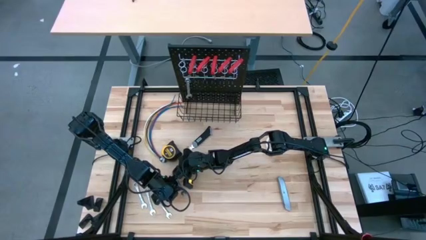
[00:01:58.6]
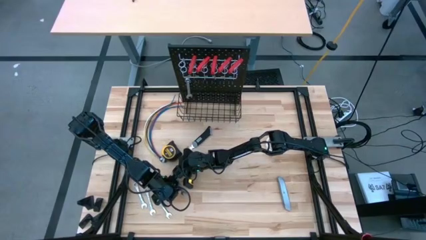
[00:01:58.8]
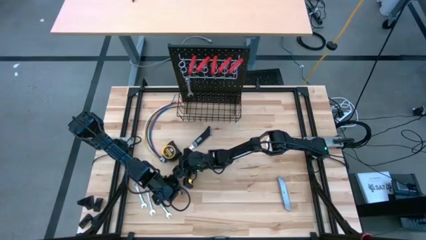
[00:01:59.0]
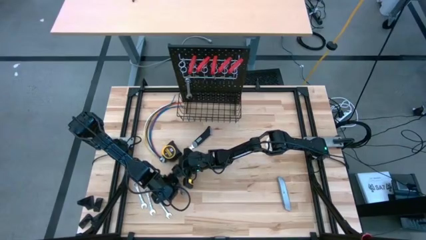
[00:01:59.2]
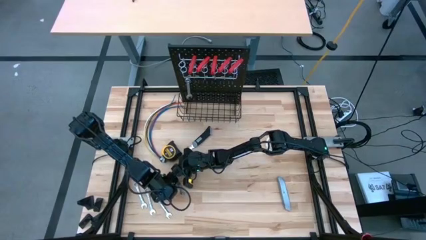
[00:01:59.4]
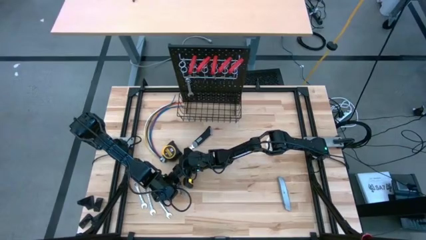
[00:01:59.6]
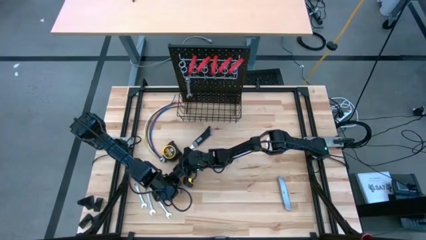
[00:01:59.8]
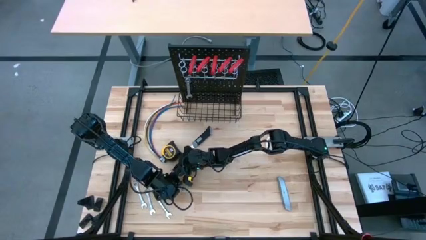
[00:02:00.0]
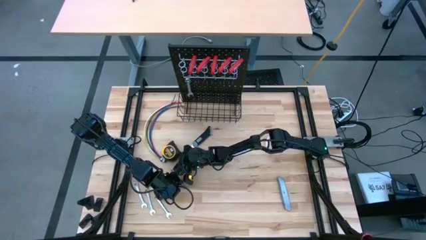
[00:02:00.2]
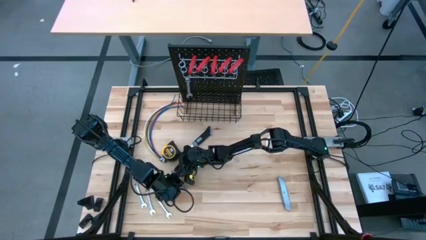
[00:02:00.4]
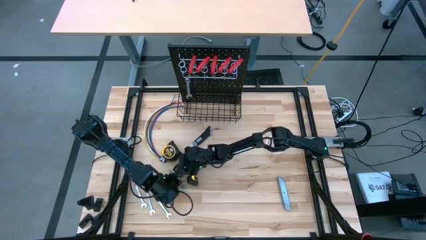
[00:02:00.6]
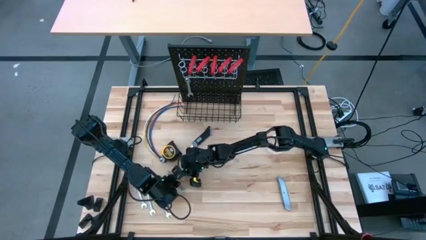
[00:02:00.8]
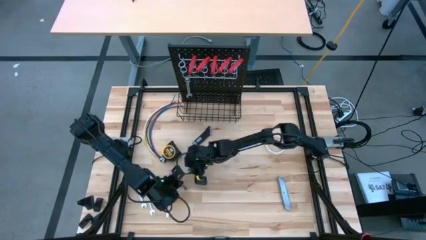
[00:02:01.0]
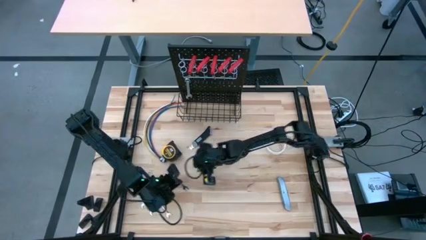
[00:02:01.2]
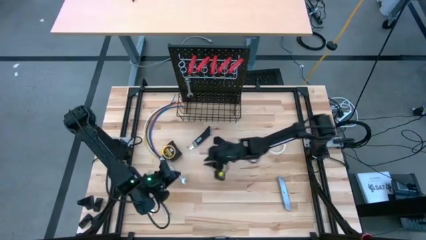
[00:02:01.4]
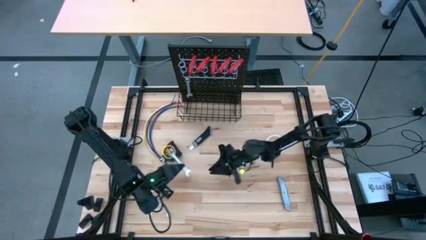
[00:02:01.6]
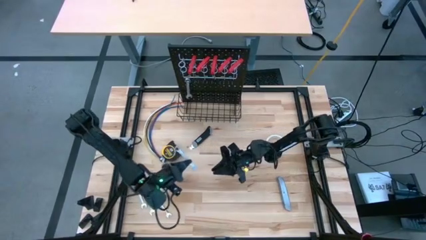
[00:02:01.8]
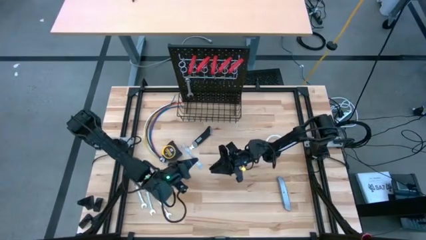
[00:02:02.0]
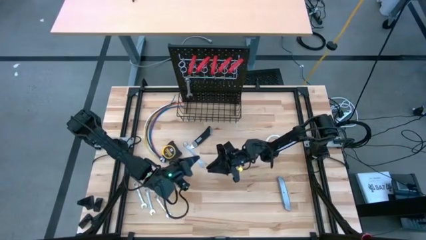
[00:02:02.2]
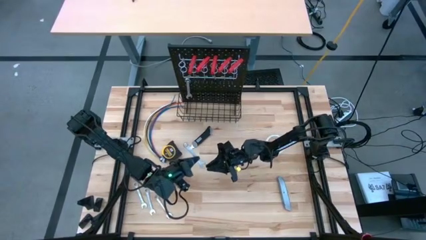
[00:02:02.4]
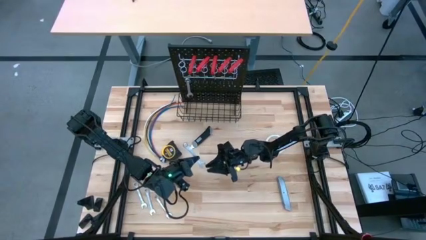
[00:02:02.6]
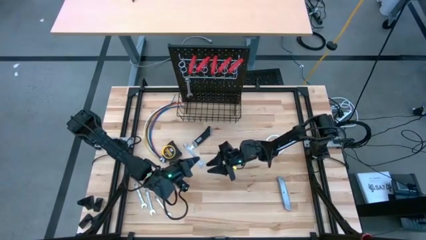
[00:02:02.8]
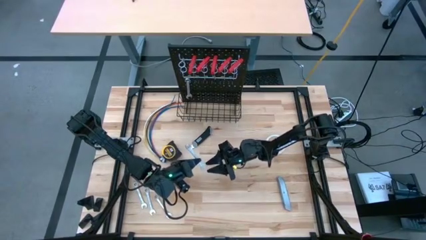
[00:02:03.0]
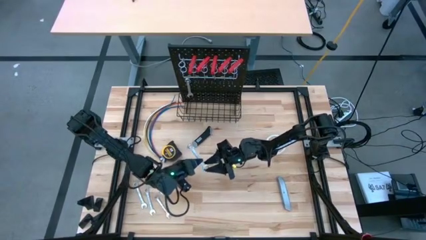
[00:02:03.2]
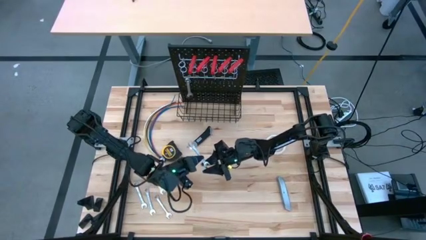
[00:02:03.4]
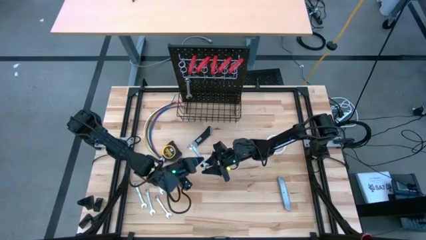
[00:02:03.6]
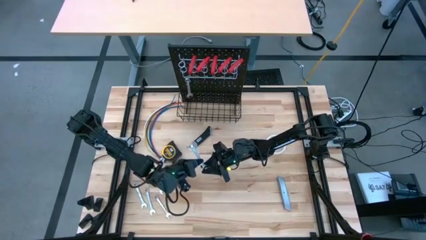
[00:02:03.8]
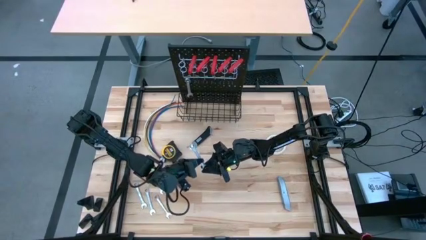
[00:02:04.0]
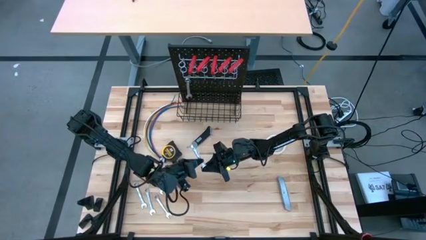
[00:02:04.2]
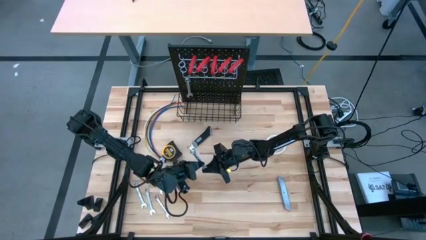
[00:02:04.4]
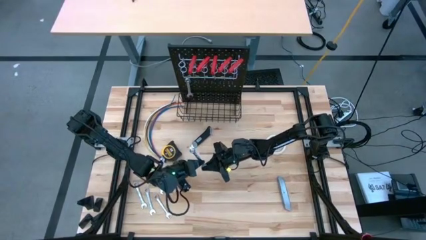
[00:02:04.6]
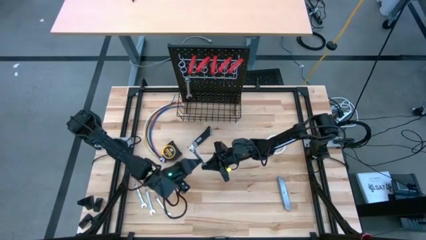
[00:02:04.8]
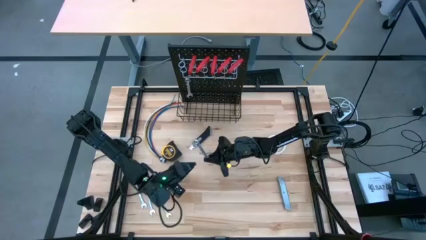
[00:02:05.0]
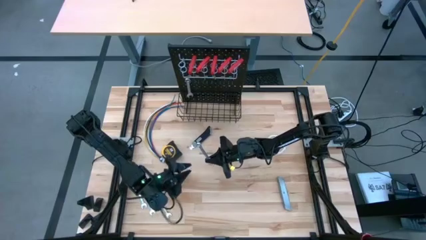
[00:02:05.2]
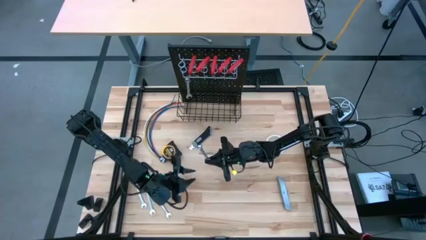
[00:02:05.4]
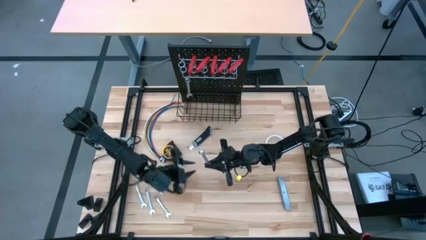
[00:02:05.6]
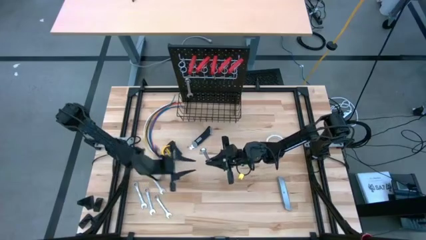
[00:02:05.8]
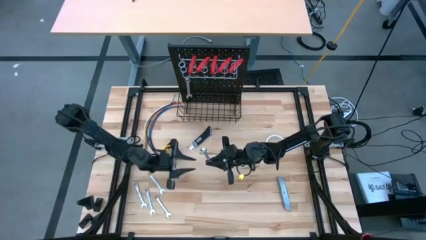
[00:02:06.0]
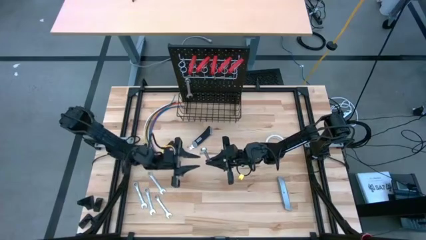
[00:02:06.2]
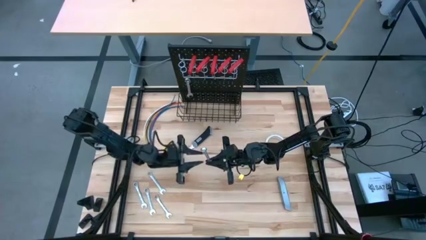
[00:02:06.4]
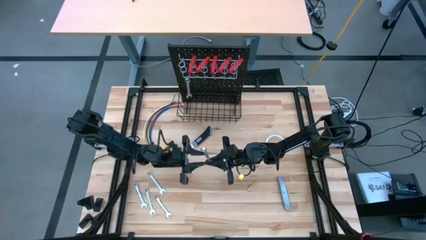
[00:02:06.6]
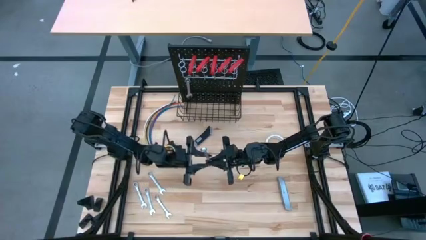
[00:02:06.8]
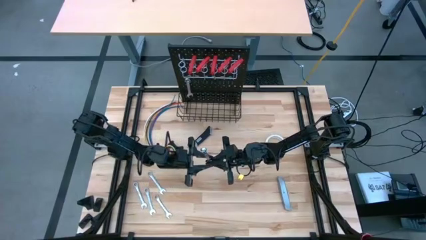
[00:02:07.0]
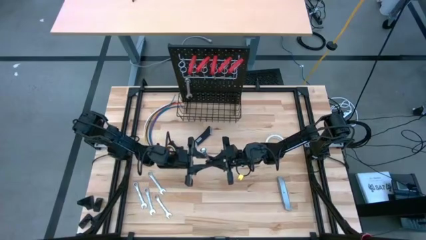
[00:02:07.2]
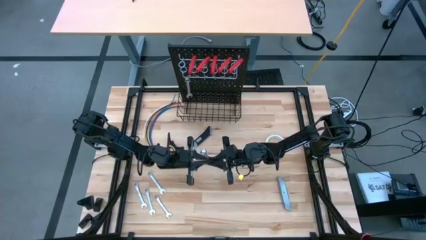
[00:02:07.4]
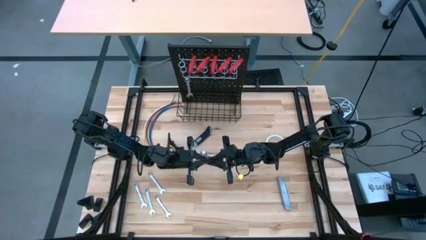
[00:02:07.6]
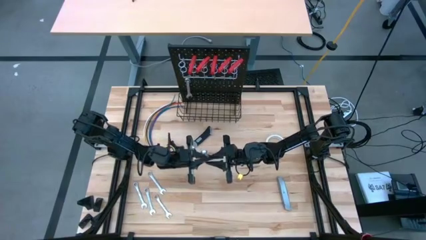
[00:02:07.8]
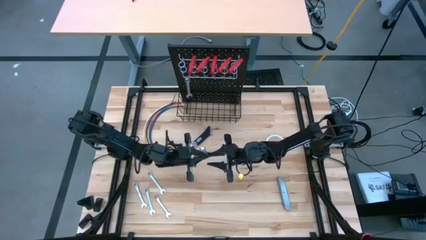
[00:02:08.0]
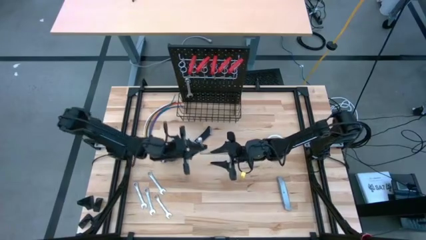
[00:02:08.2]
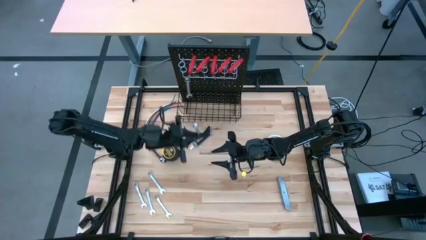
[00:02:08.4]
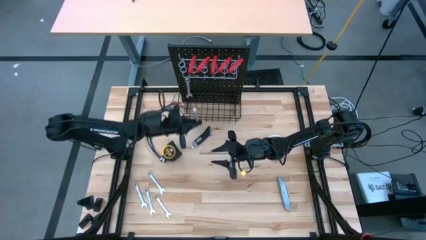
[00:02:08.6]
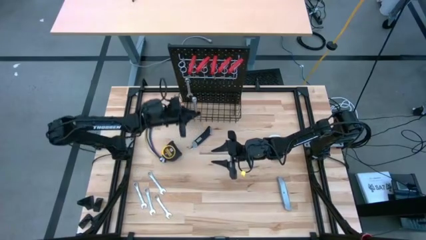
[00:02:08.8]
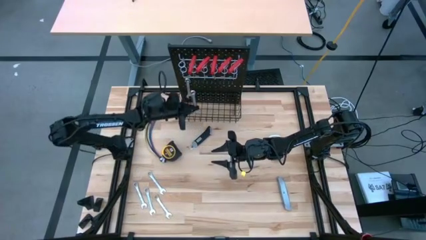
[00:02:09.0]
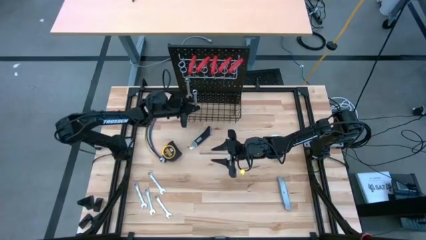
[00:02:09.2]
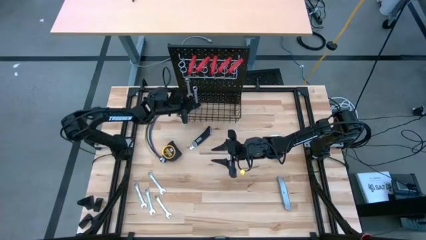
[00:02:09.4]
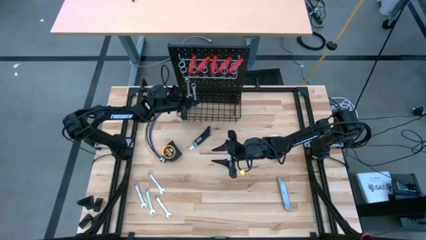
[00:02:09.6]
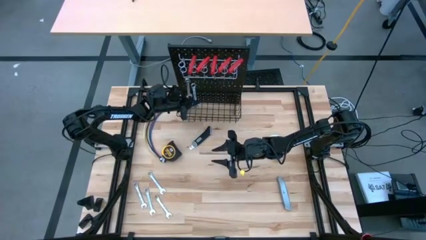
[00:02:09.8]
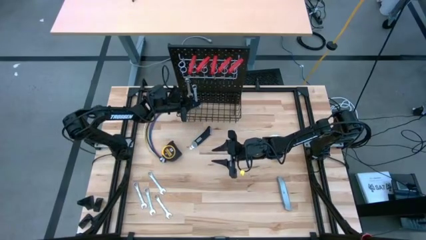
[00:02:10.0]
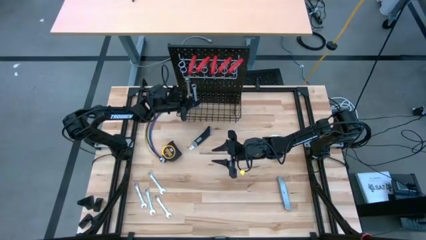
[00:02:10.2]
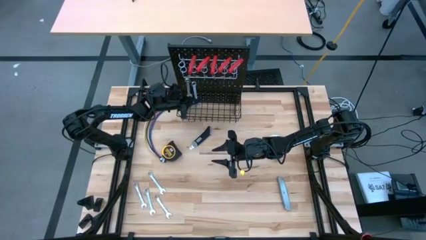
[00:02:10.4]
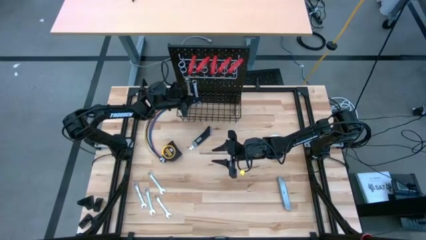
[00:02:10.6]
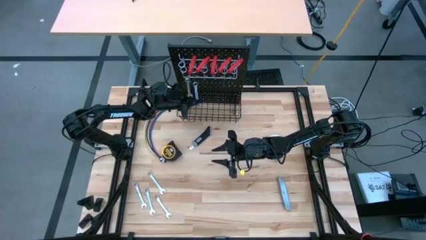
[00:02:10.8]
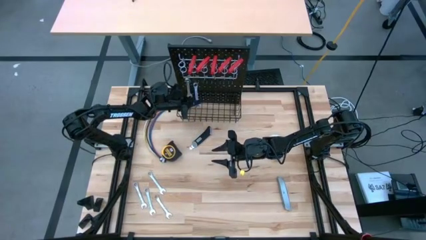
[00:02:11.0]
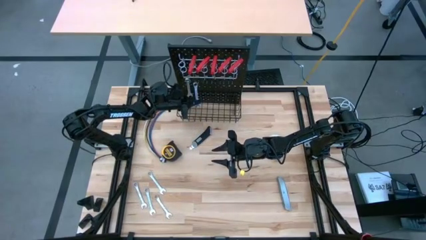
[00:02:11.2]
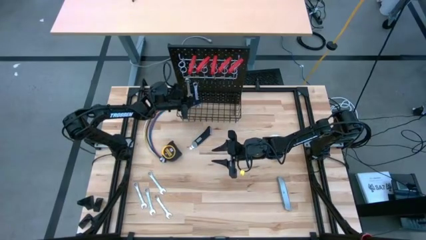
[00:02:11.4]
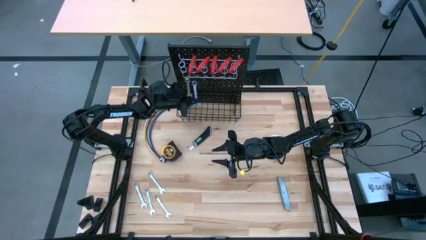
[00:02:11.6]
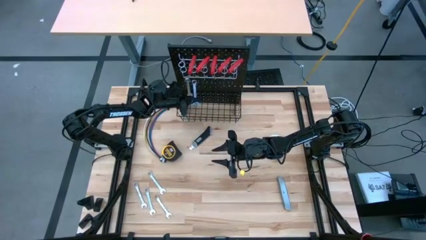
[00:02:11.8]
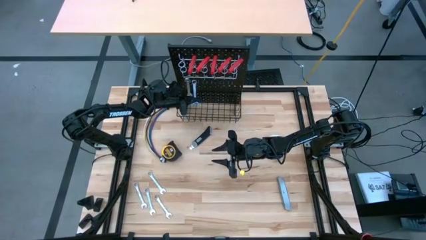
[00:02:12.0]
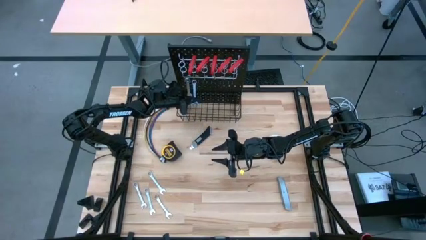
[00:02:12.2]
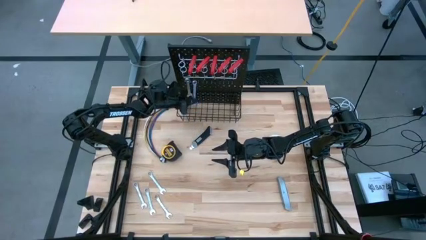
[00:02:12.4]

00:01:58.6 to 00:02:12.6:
Task: Hang tools onto peg board
Hang the wrench on the peg board

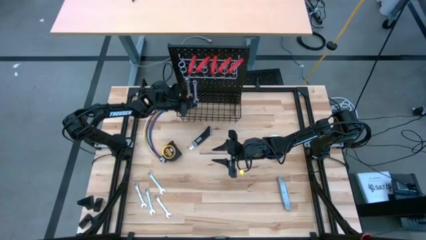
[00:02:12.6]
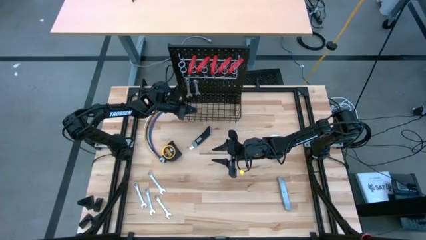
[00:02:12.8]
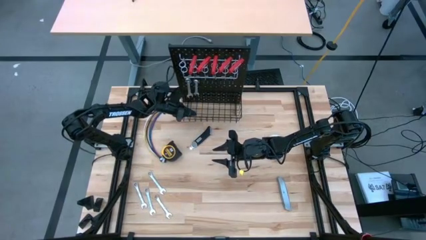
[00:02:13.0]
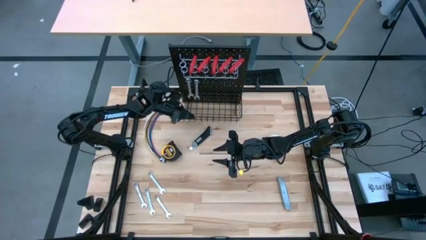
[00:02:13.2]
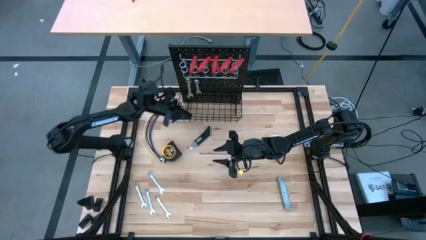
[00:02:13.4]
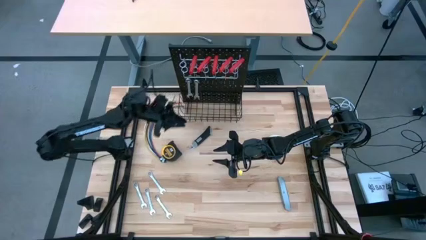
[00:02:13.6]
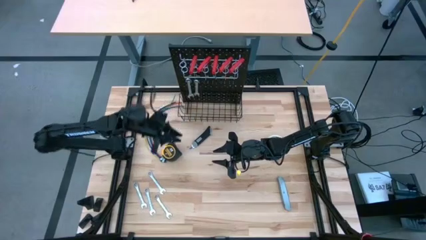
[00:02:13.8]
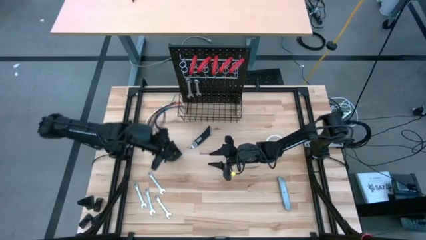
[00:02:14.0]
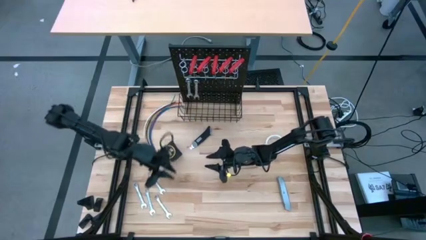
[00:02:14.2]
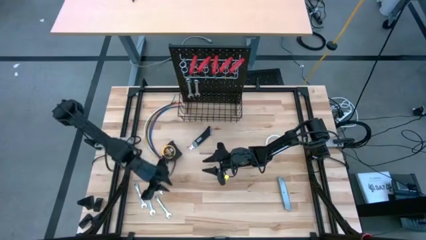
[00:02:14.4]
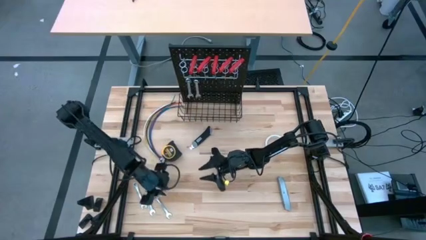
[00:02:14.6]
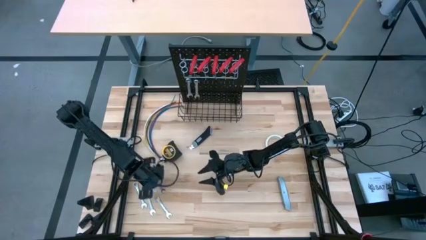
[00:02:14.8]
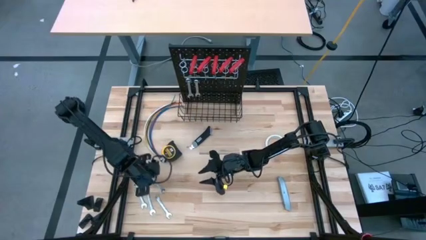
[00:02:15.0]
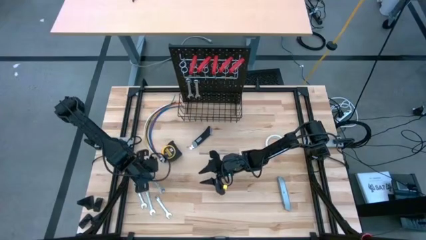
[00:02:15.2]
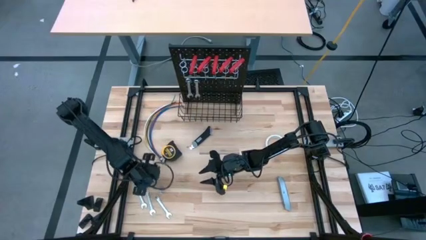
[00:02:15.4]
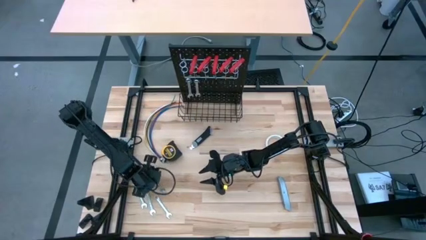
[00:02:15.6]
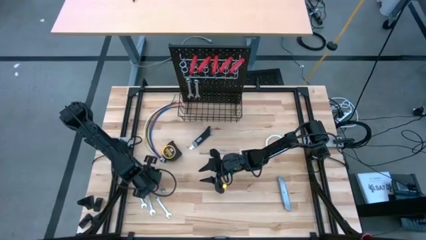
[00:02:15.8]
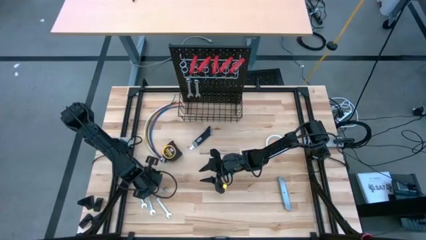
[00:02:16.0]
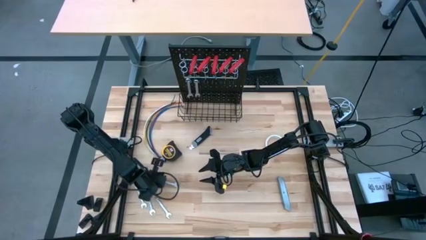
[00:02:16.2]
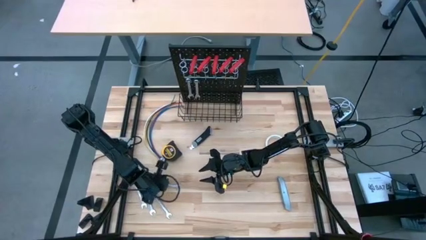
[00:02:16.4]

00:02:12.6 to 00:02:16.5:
Hang the wrench on the peg board
